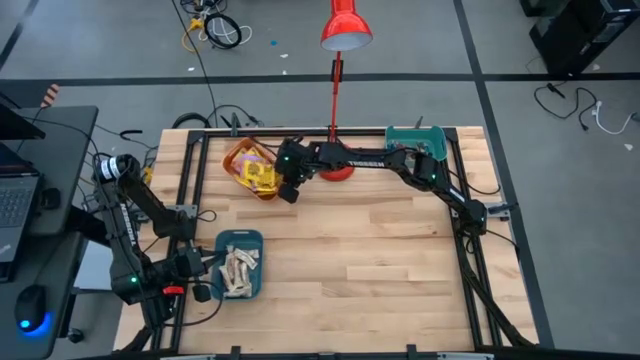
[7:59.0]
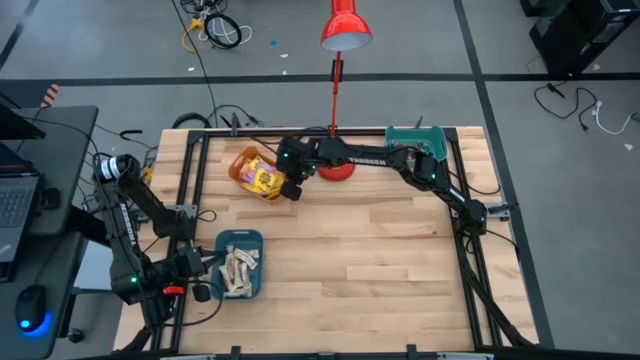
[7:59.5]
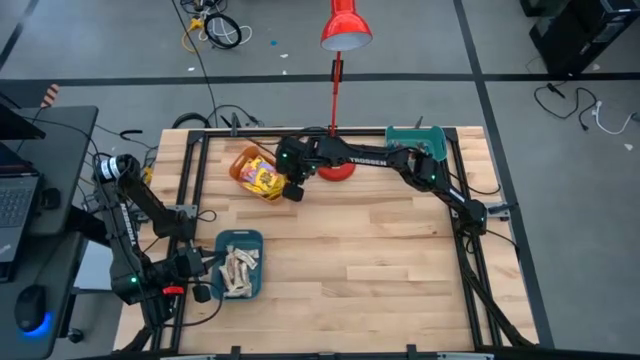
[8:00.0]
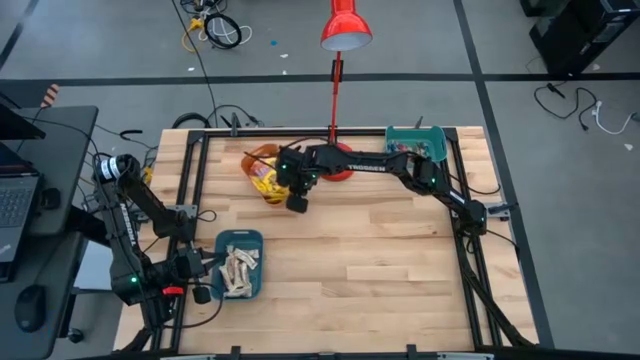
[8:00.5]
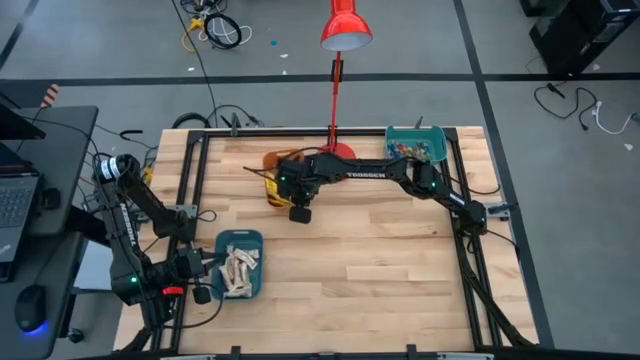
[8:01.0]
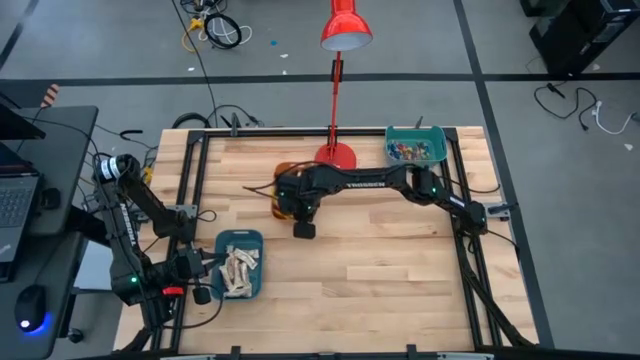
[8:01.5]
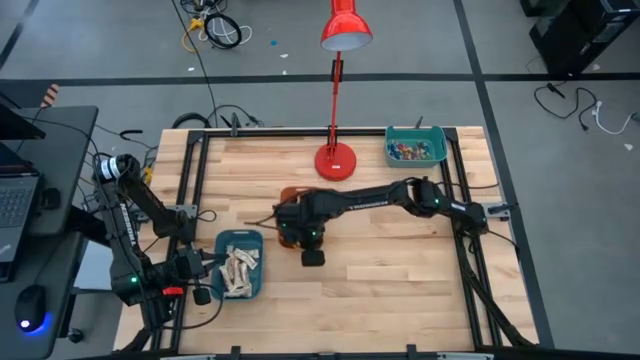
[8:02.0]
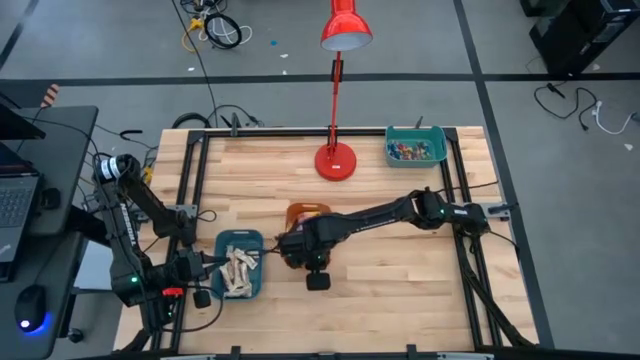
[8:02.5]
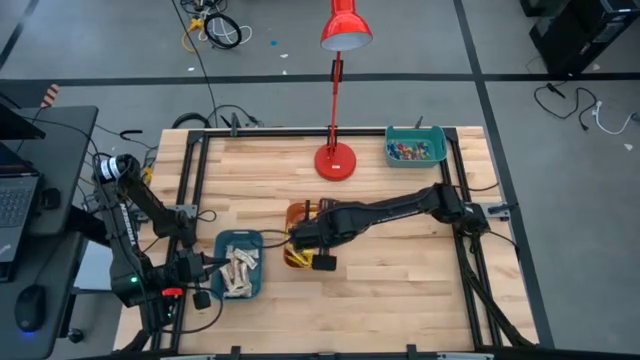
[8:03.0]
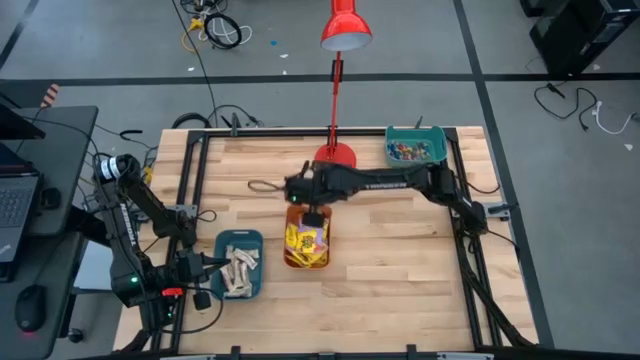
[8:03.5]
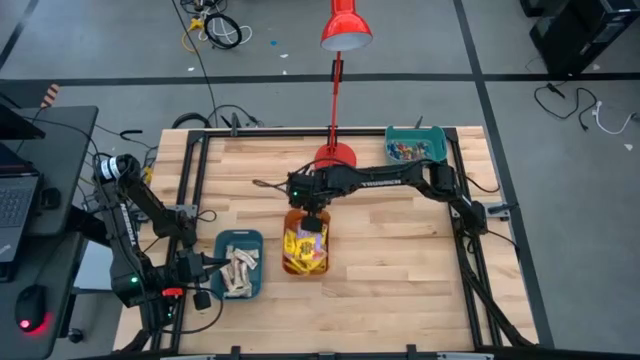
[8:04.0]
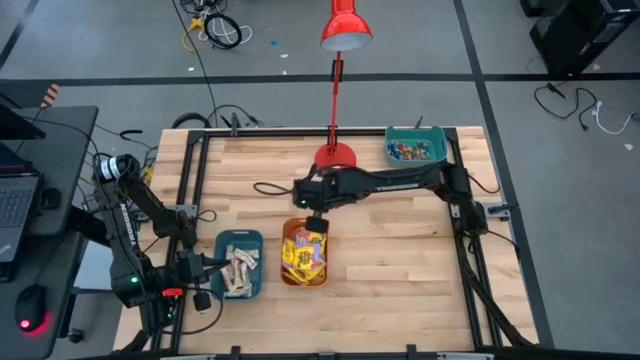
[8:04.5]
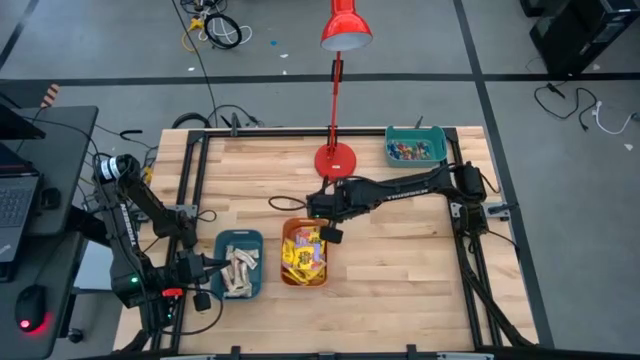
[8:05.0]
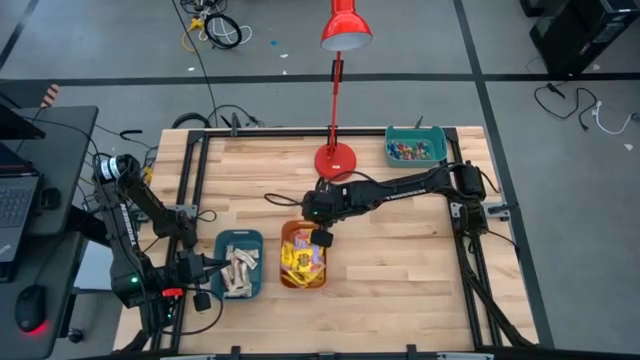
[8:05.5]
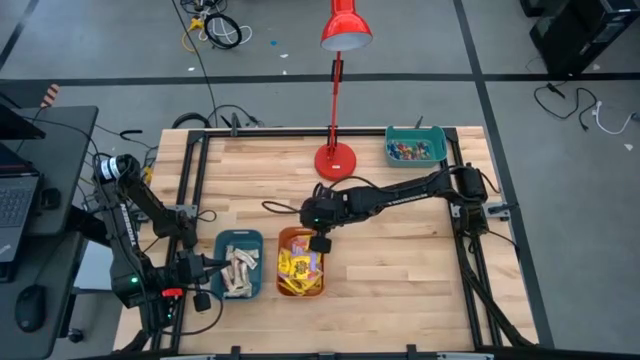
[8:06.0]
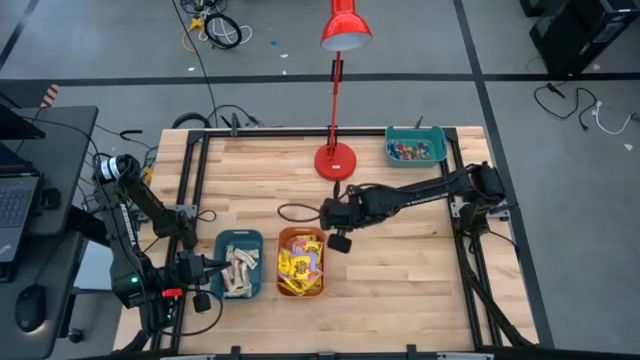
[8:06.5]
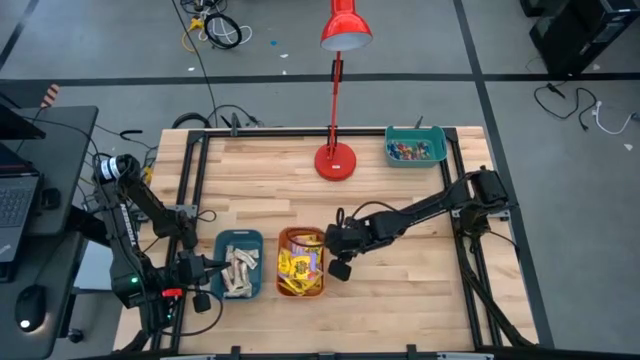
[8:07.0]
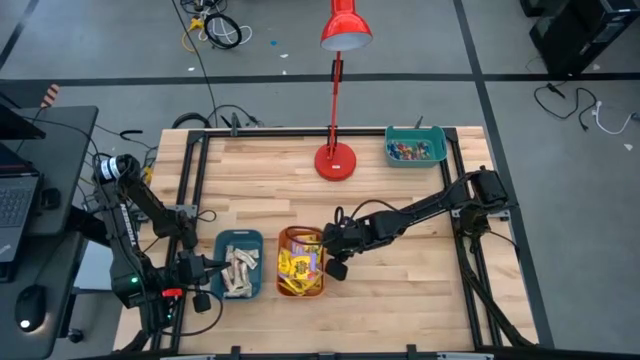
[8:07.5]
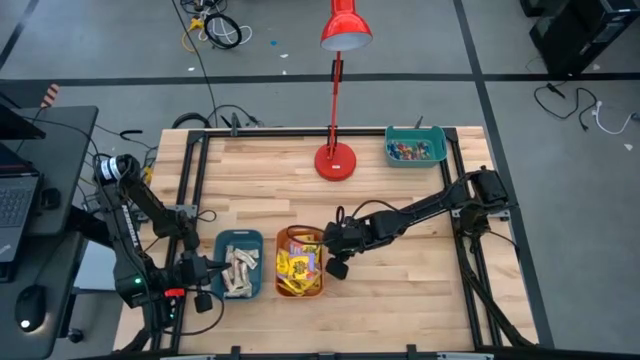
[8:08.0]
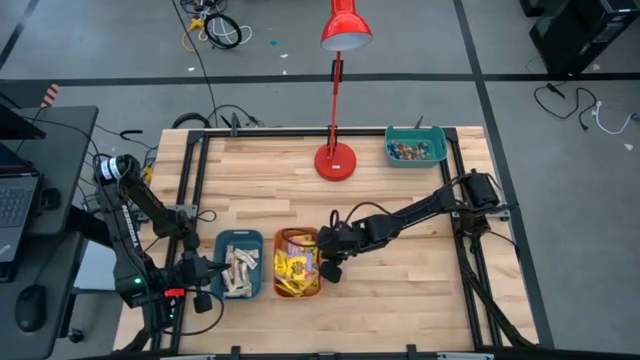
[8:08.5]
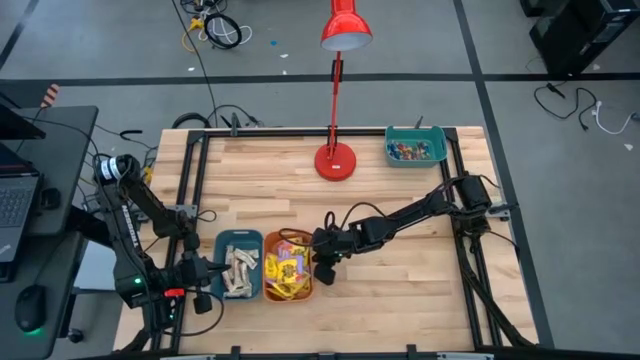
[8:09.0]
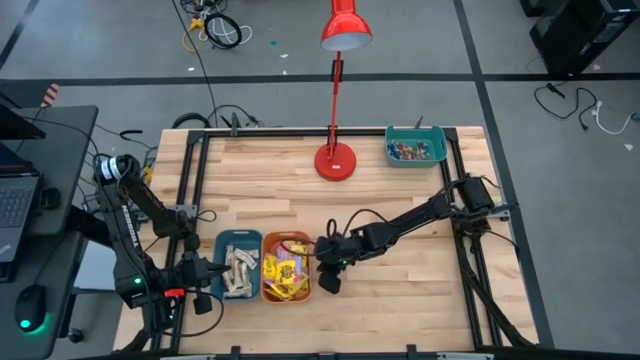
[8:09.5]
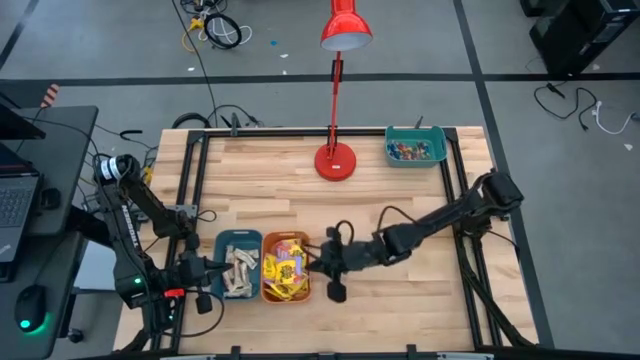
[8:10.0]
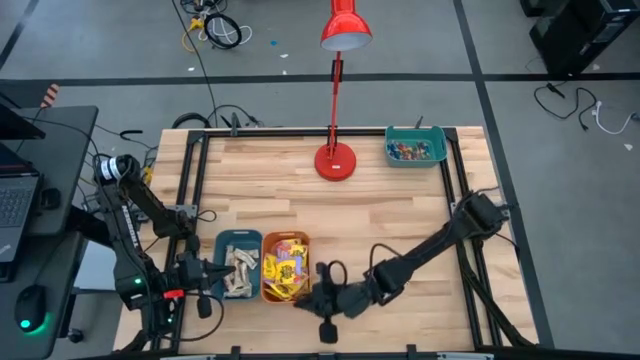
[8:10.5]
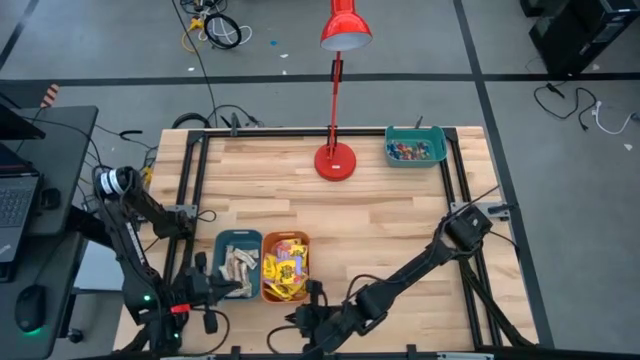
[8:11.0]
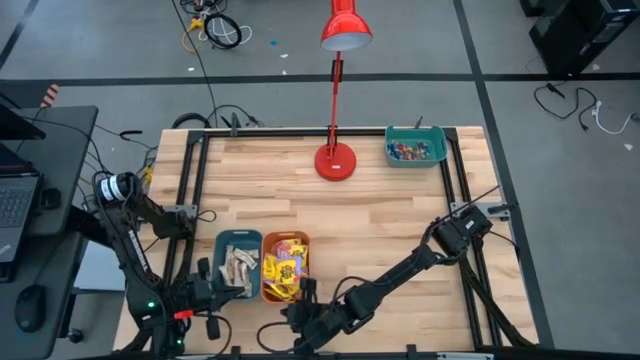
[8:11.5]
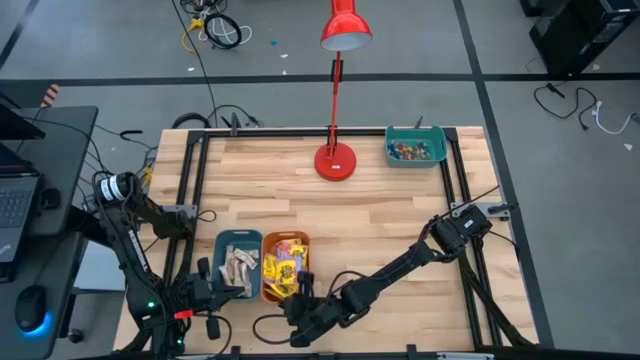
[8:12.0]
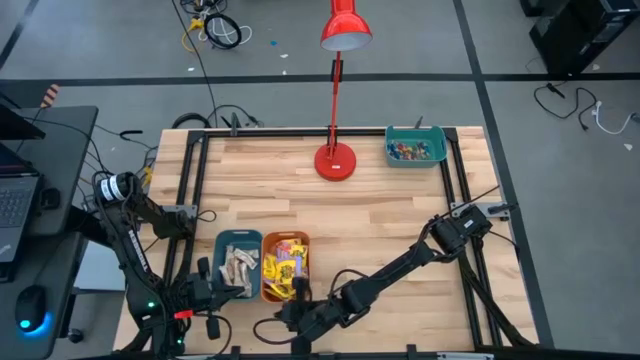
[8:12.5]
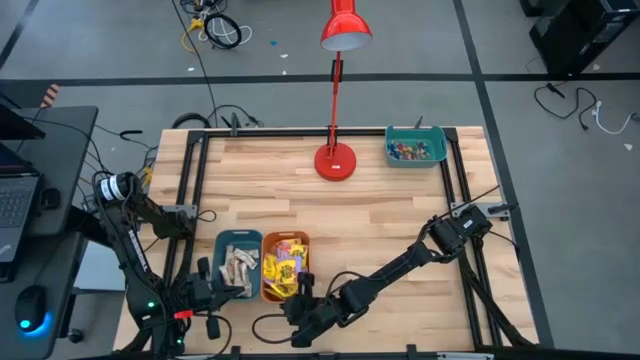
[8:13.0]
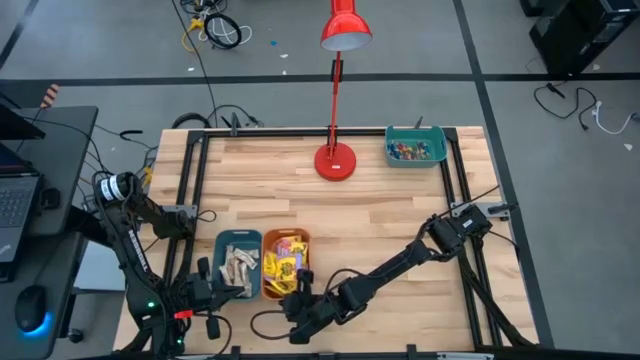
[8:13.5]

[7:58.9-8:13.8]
Task: Sort candy
Move the orange bin to the right of the blue bin

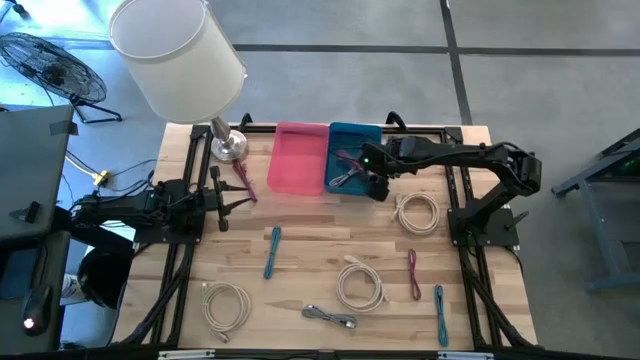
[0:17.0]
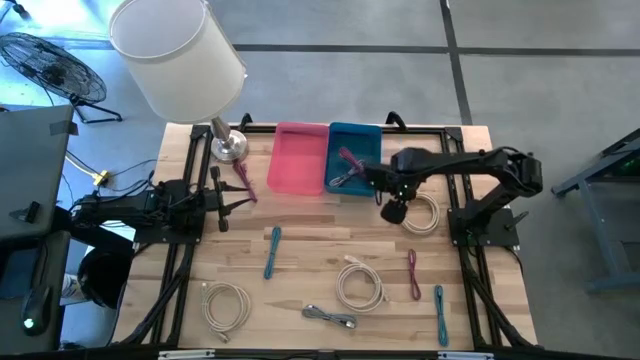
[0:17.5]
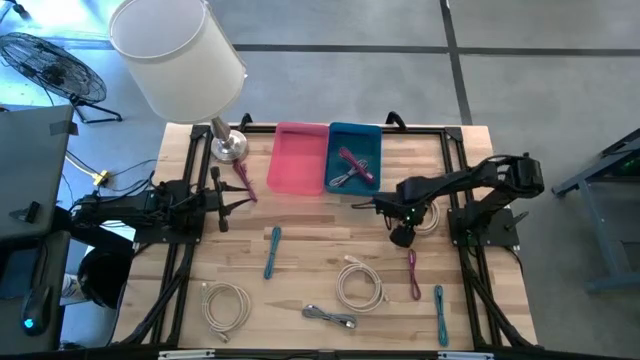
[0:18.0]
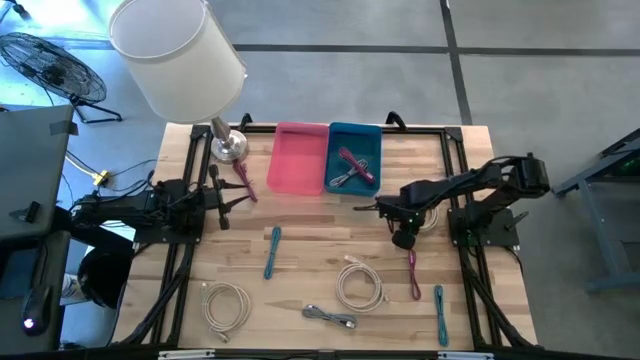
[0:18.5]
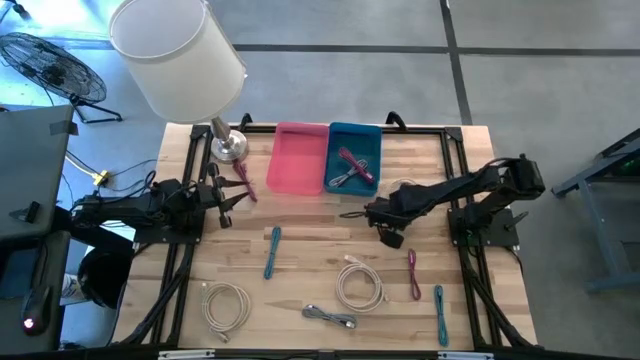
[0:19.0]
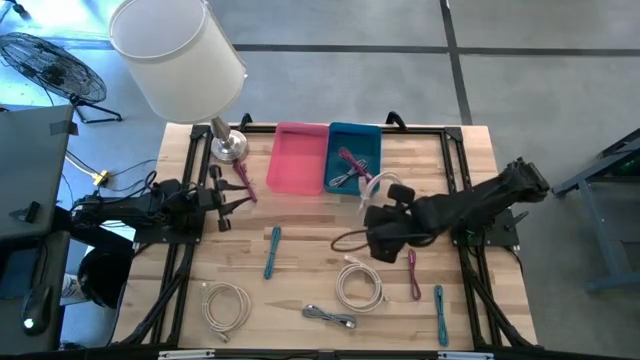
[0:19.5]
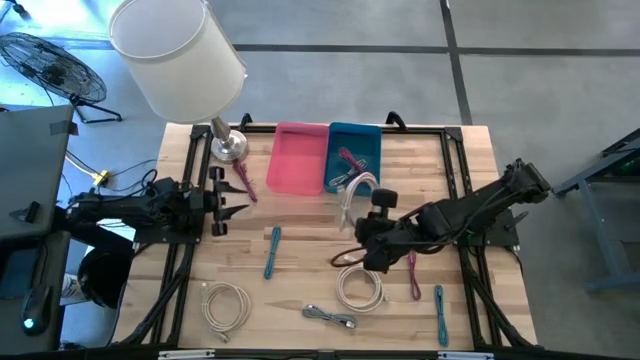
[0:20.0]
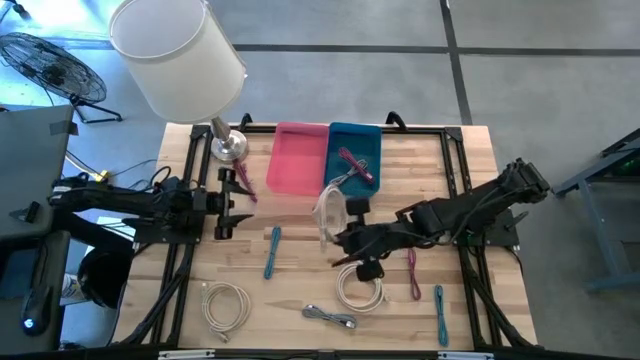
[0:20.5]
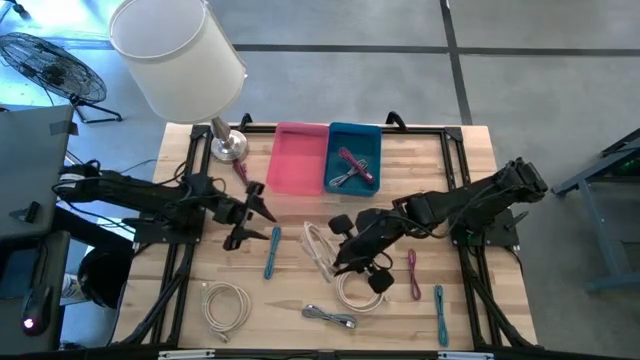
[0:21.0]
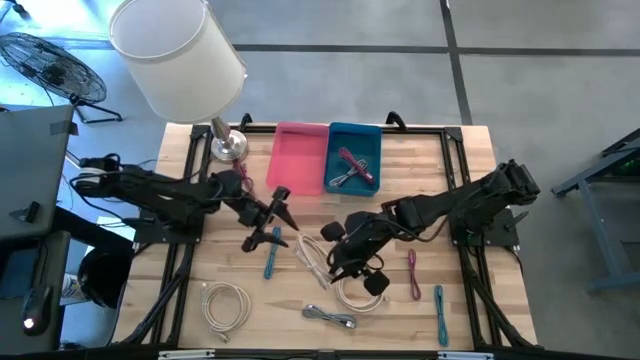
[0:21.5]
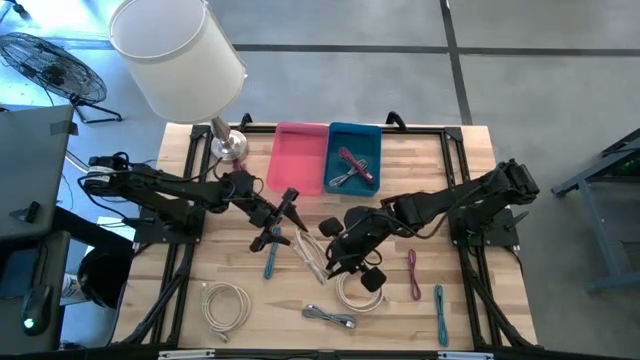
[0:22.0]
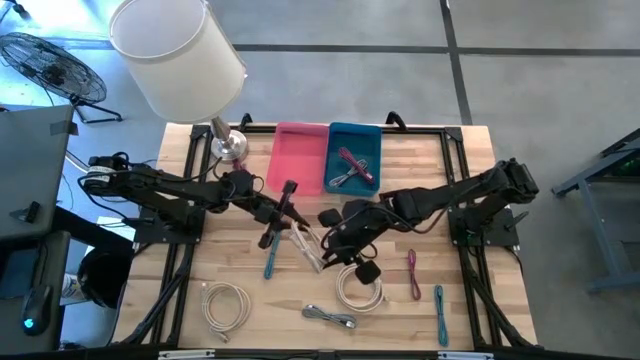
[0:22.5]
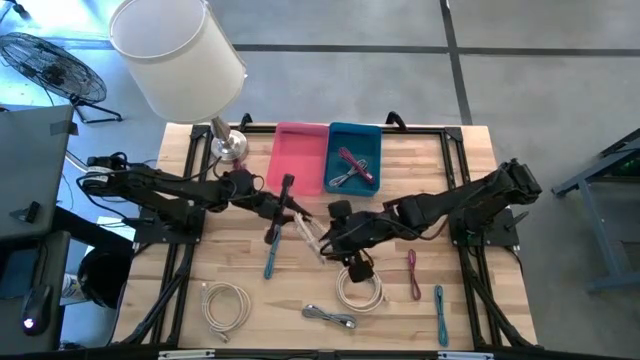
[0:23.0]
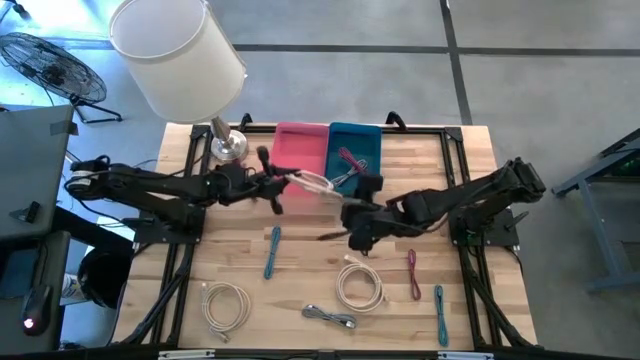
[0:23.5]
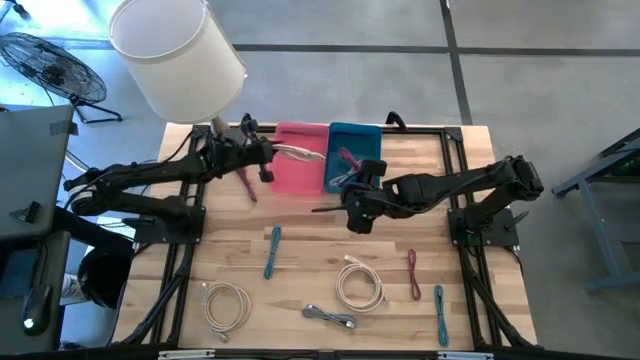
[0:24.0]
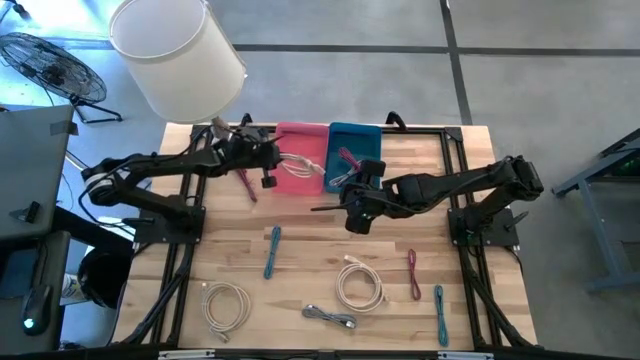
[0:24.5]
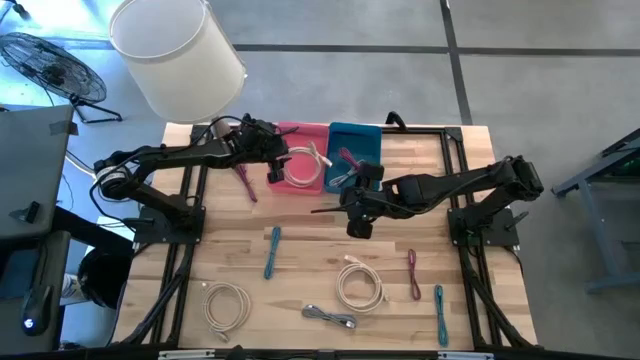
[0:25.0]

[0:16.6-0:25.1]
Task: Pick & Place USB Port
Put the top light brown hdmi cable into the pink bin
